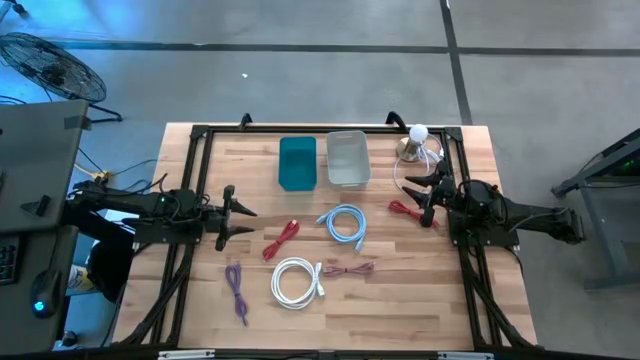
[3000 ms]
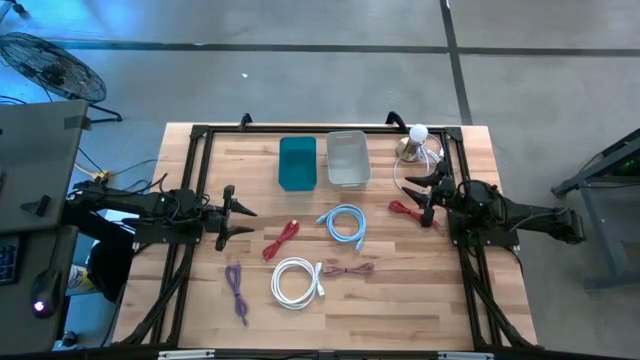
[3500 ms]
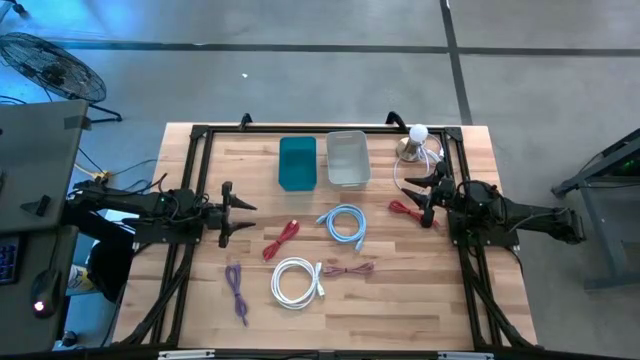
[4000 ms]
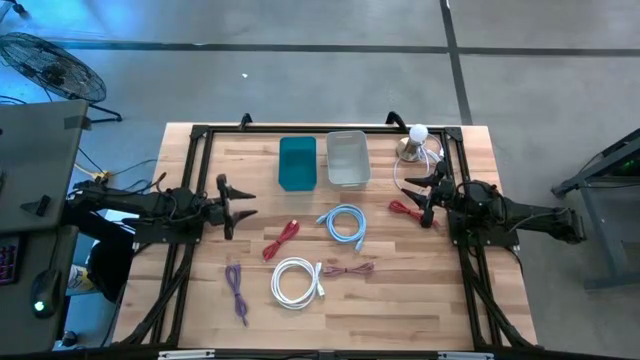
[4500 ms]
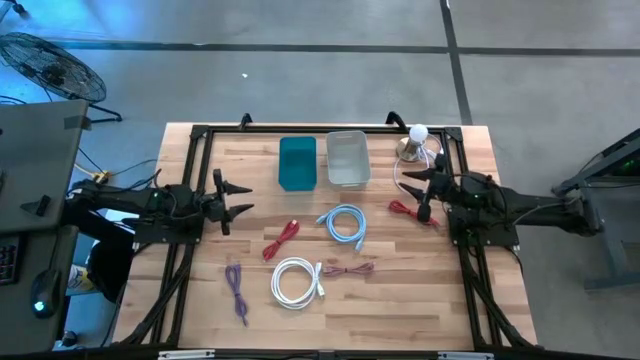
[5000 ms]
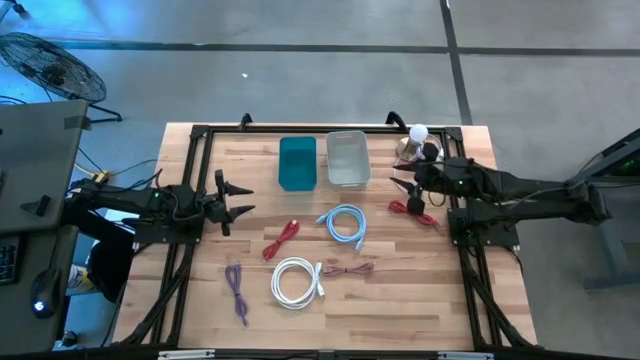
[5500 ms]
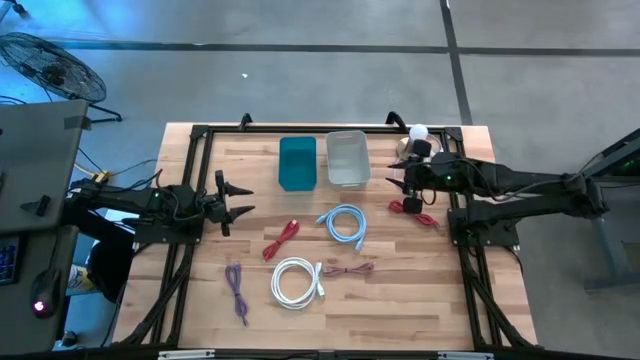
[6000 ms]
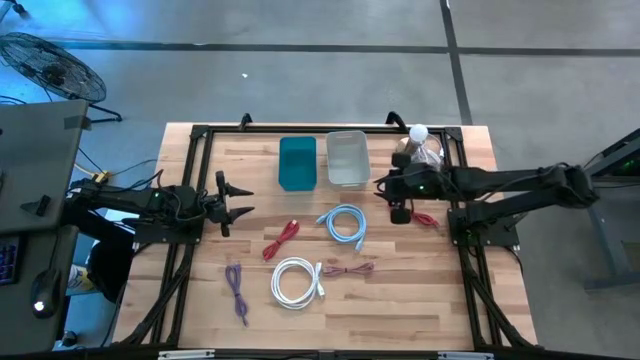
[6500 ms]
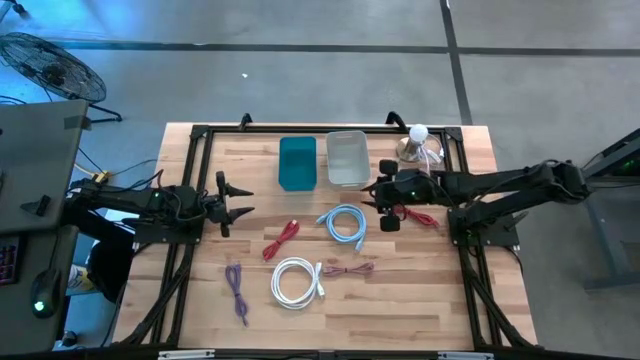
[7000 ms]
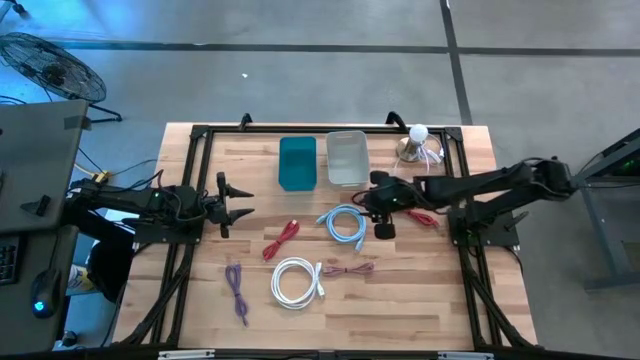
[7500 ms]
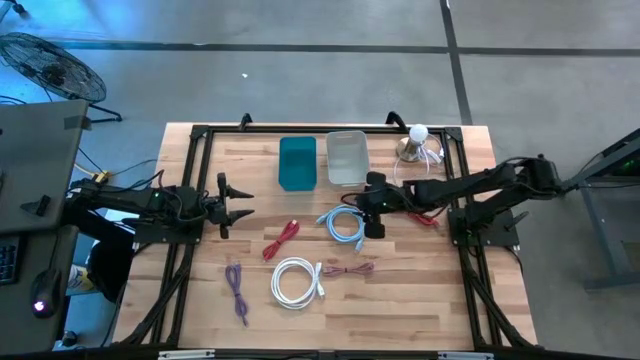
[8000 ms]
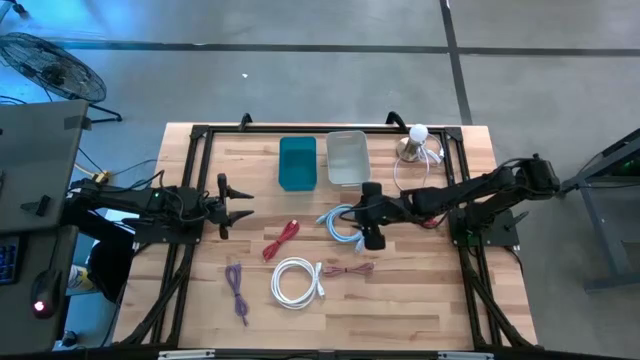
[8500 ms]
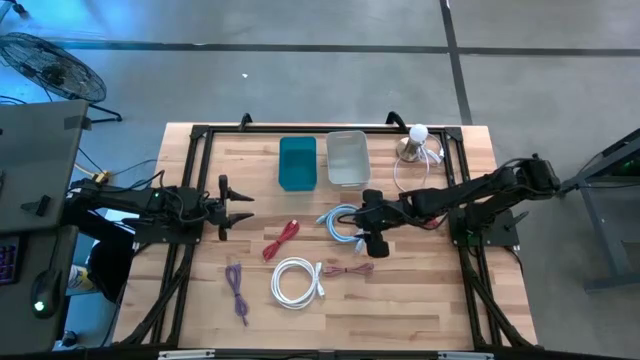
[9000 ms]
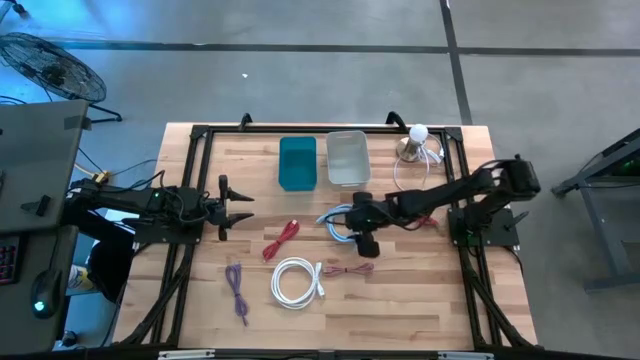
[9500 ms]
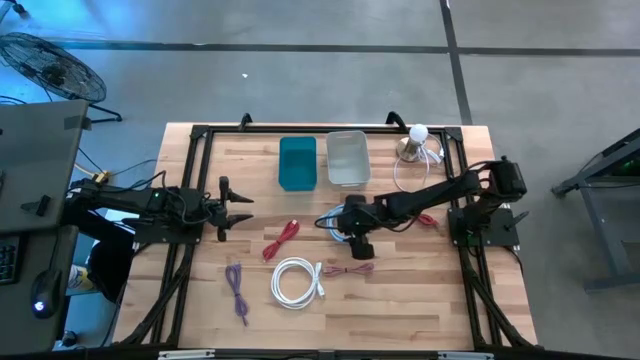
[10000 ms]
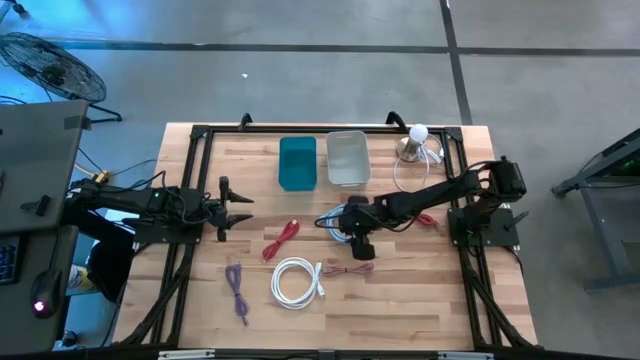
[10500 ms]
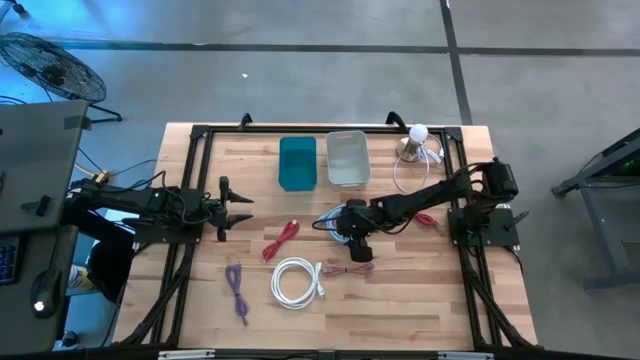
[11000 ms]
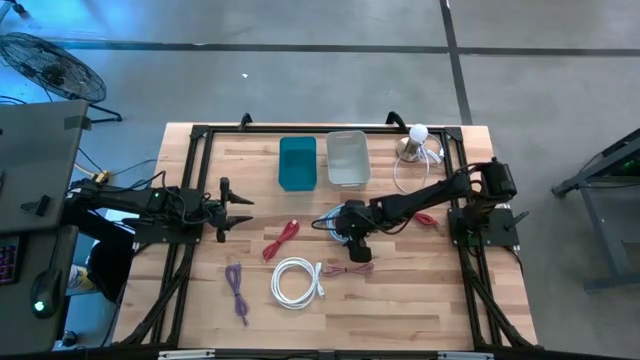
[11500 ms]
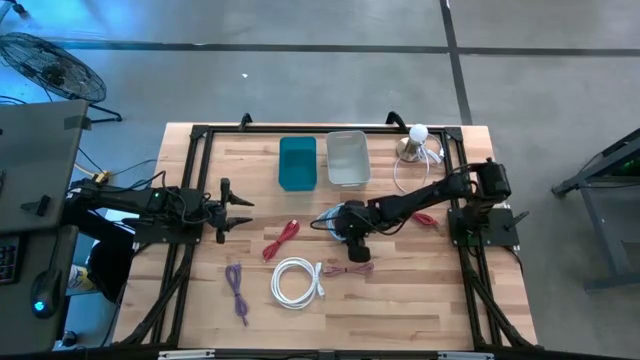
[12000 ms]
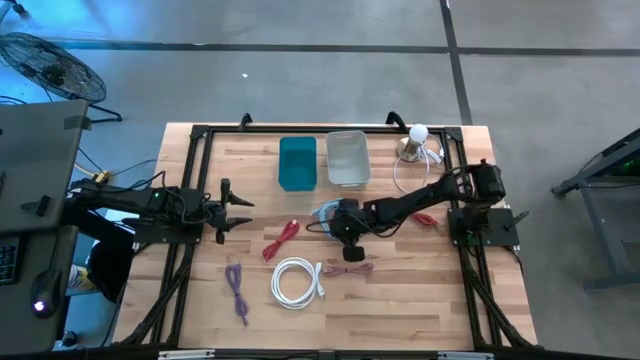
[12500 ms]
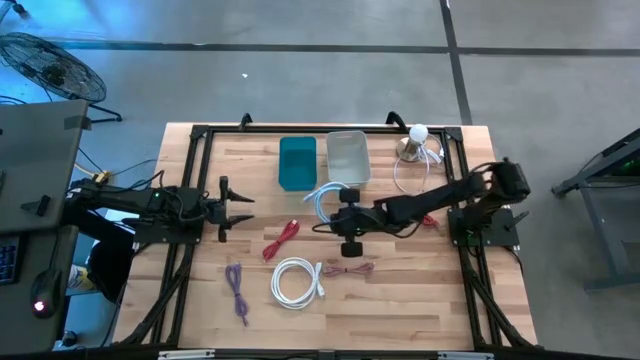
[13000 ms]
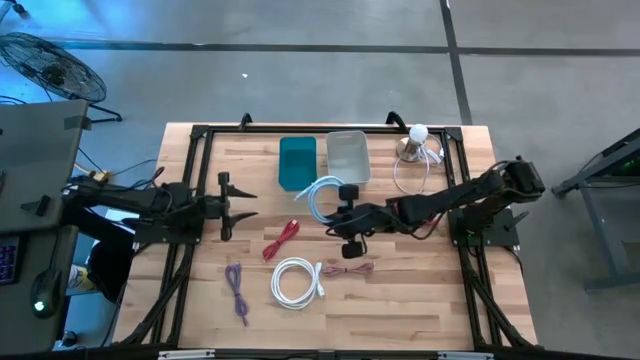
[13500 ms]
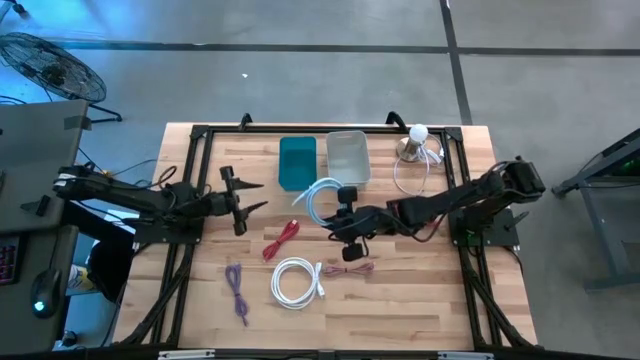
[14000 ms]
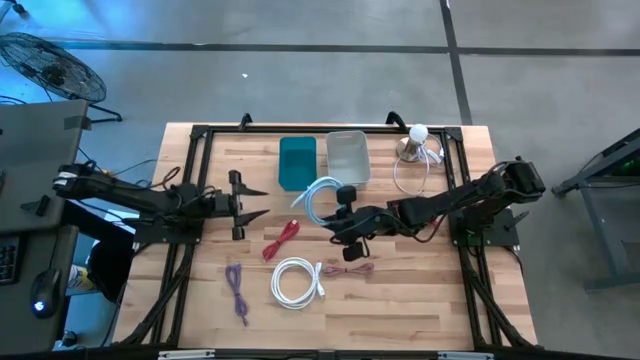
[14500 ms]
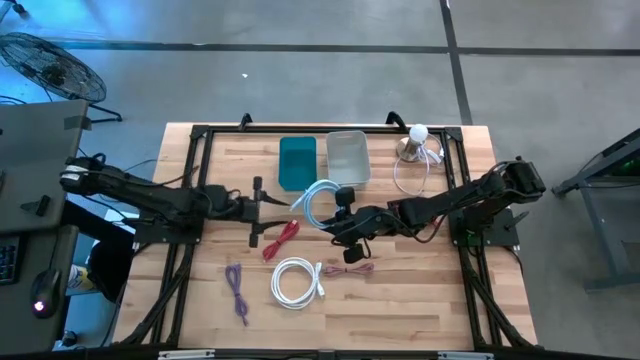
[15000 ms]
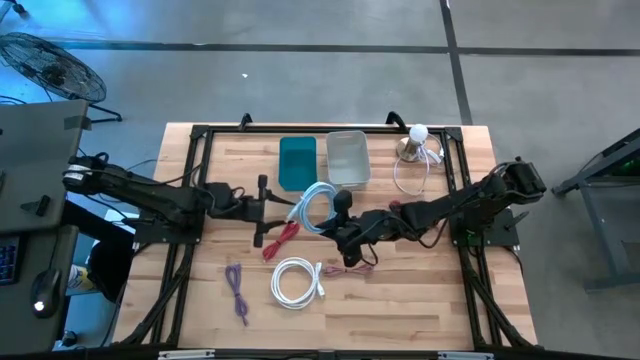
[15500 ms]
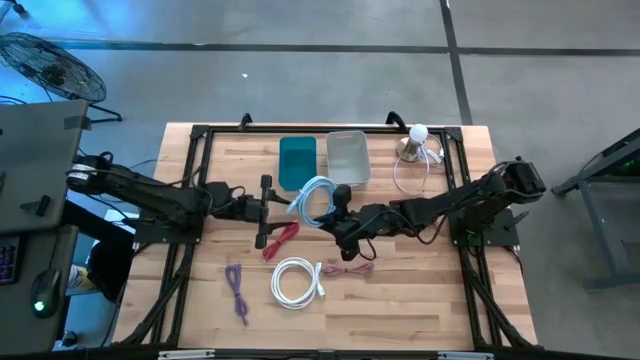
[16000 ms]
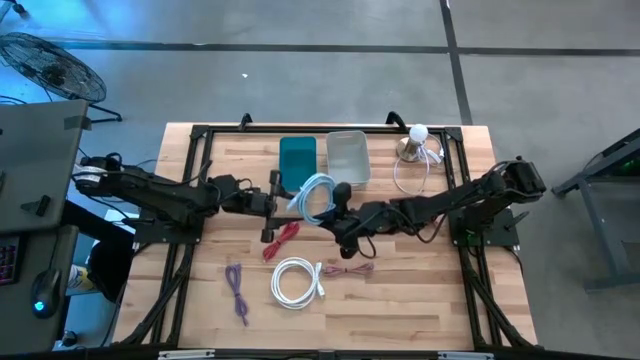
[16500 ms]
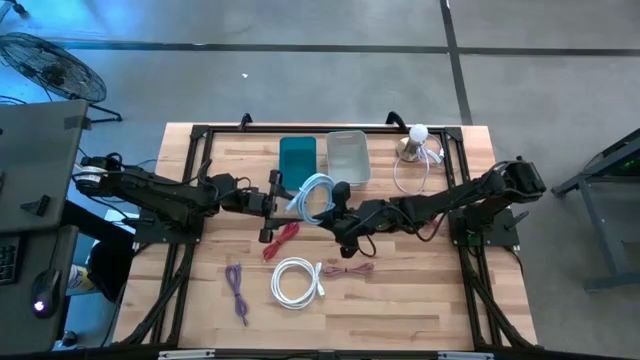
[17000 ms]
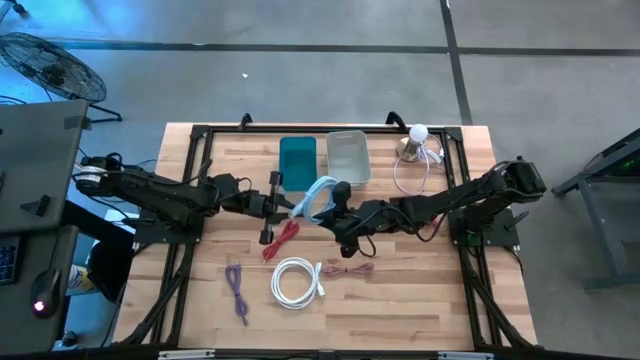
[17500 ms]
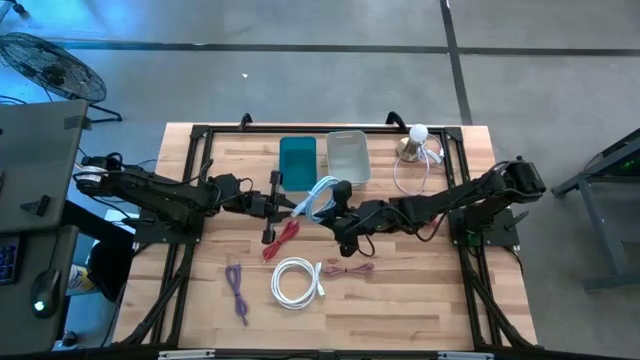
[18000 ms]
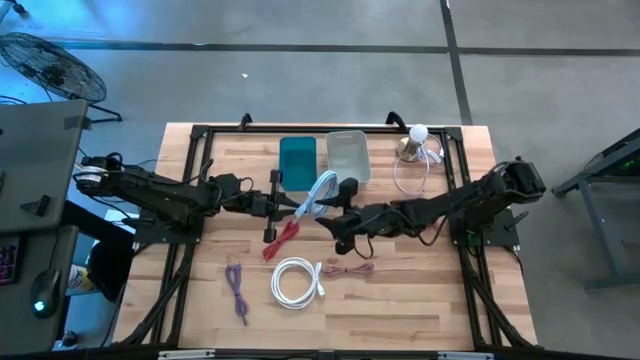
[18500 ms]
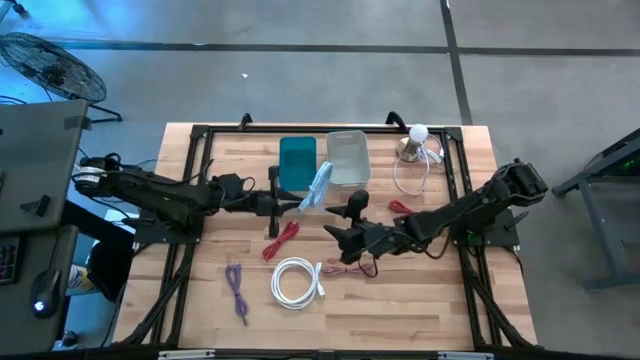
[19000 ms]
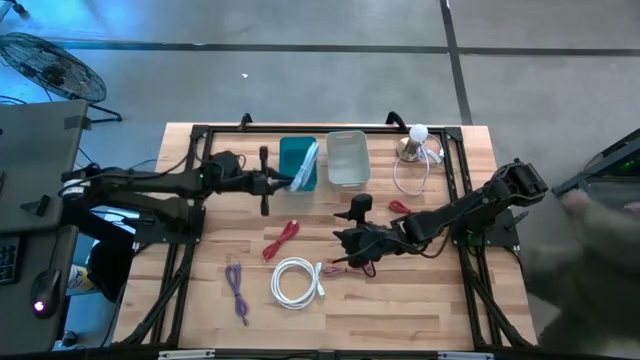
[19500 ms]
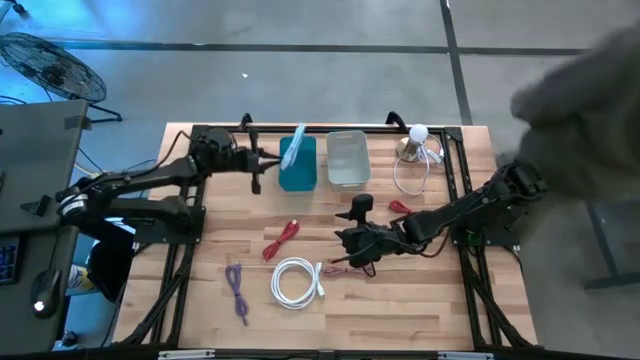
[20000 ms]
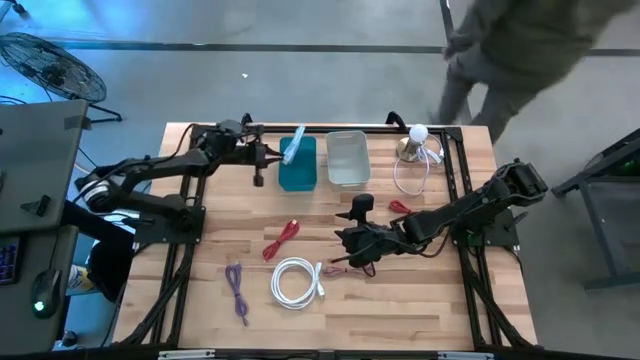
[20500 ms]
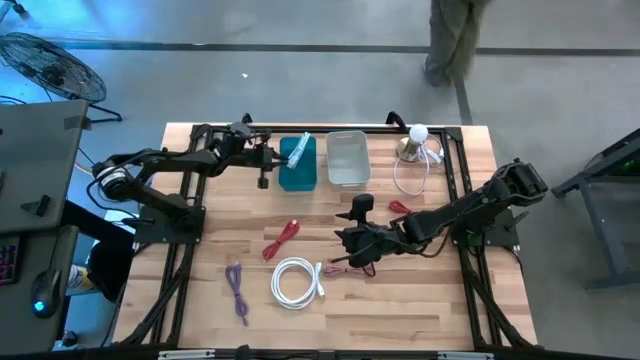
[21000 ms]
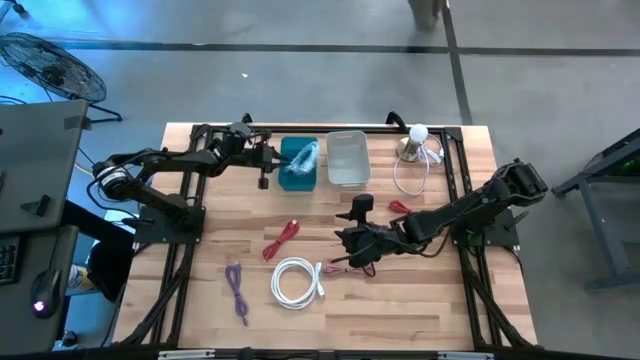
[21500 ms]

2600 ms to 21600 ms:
Task: Pick & Place USB Port
Put the blue HDMI cable into the blue bin
